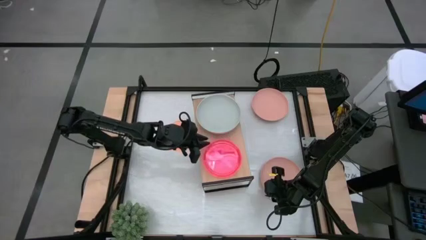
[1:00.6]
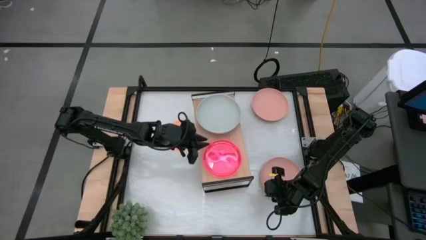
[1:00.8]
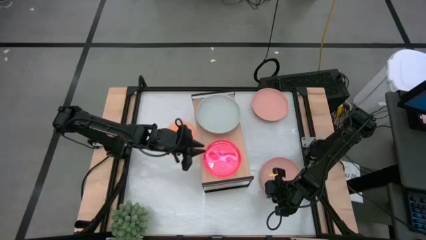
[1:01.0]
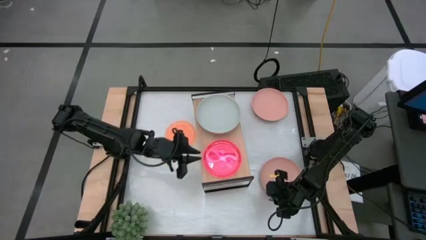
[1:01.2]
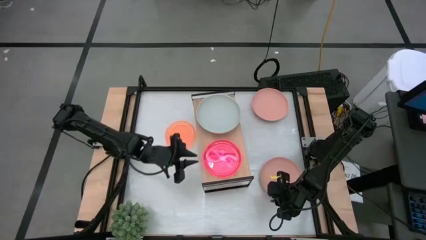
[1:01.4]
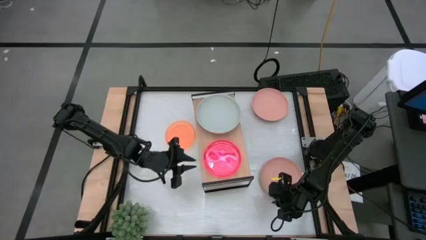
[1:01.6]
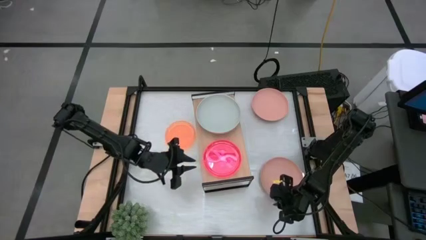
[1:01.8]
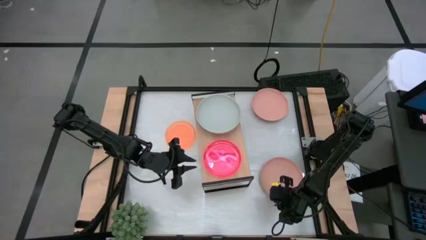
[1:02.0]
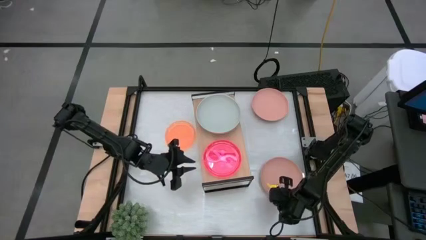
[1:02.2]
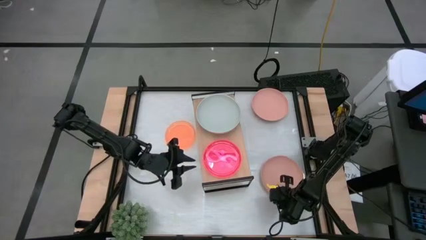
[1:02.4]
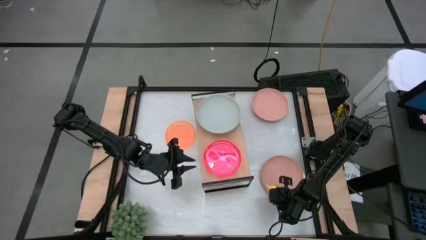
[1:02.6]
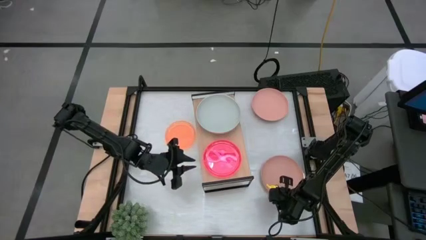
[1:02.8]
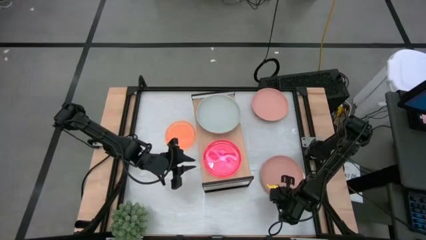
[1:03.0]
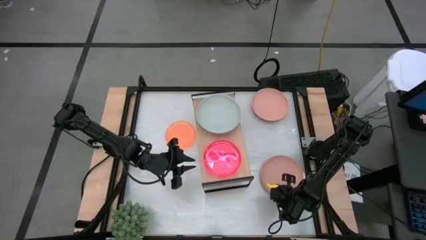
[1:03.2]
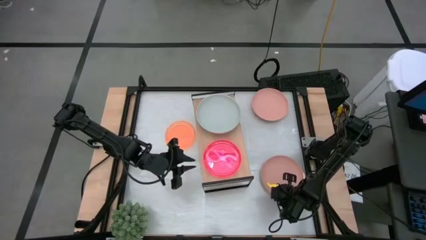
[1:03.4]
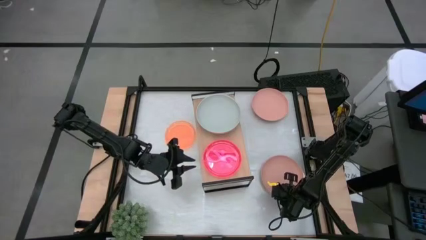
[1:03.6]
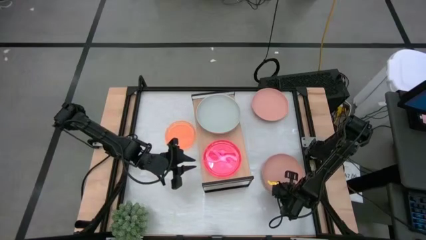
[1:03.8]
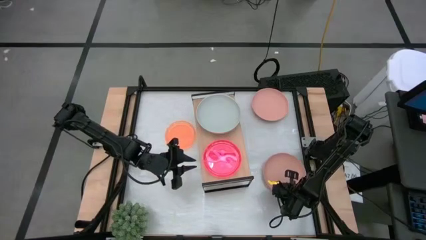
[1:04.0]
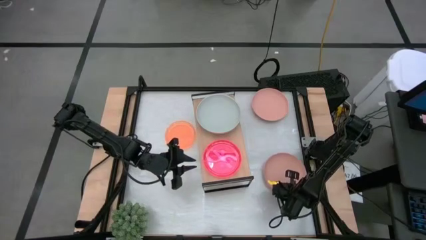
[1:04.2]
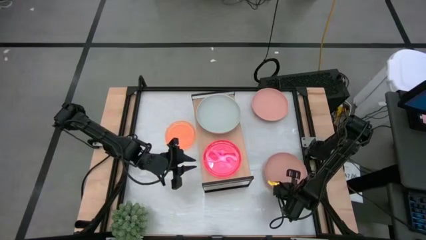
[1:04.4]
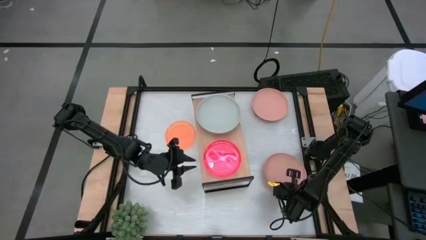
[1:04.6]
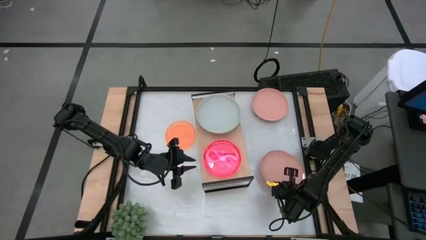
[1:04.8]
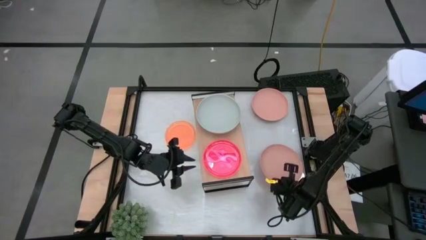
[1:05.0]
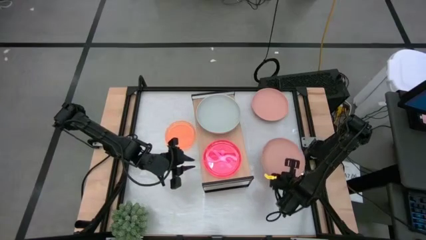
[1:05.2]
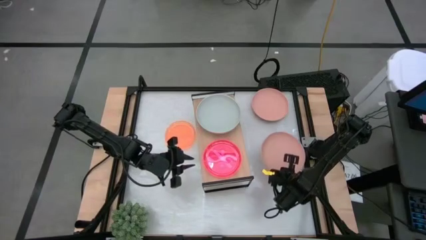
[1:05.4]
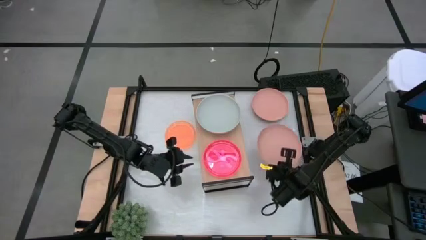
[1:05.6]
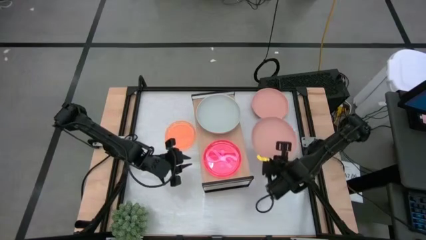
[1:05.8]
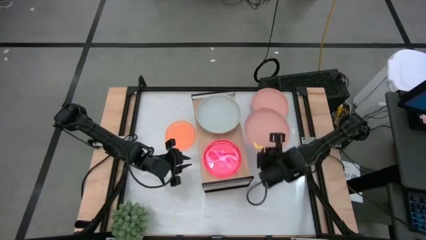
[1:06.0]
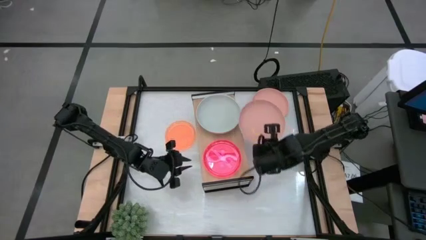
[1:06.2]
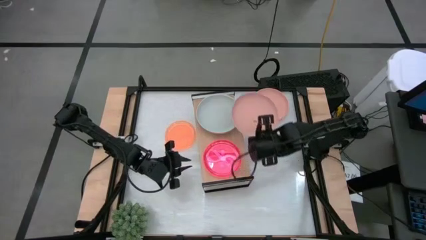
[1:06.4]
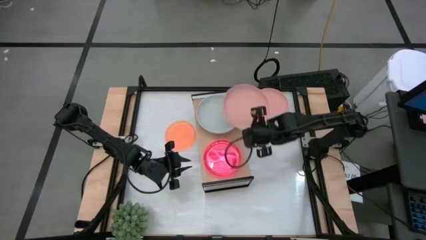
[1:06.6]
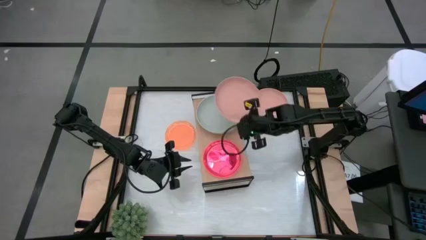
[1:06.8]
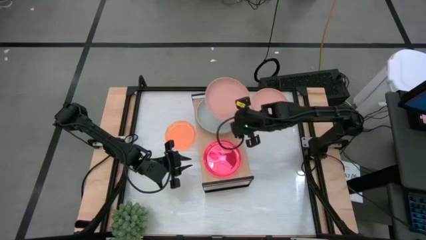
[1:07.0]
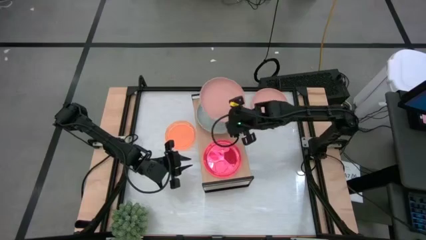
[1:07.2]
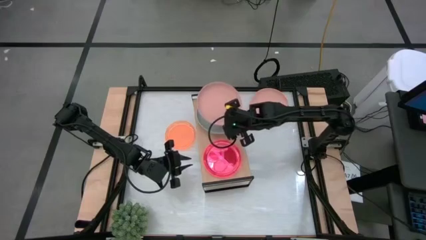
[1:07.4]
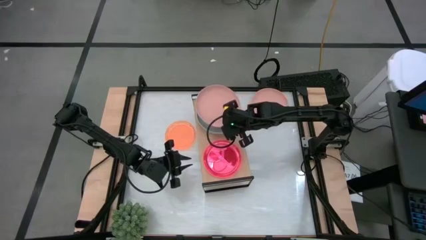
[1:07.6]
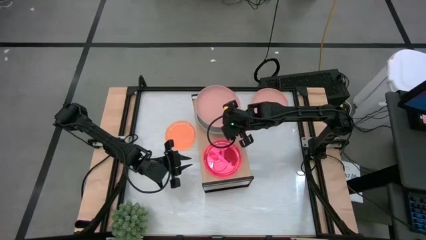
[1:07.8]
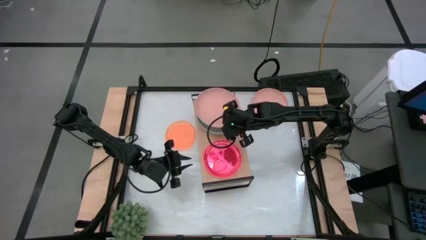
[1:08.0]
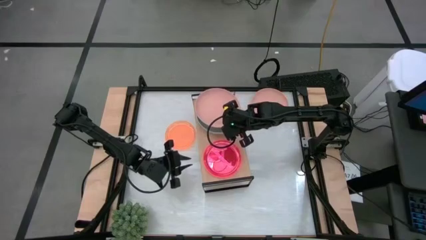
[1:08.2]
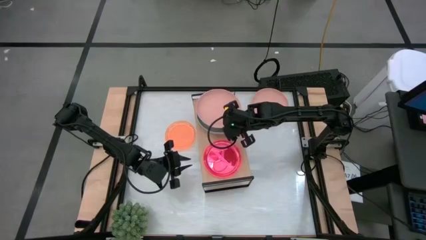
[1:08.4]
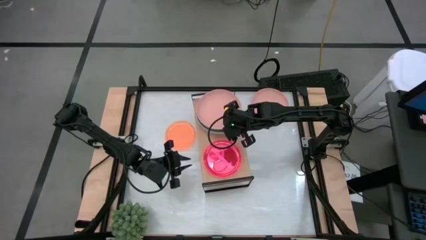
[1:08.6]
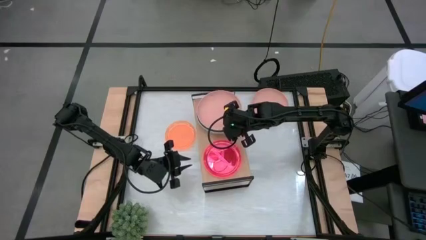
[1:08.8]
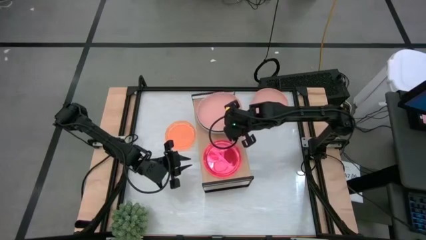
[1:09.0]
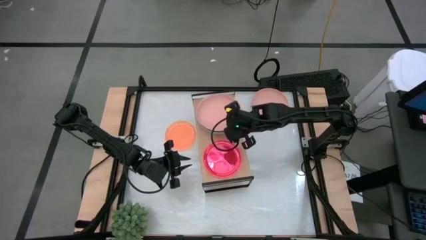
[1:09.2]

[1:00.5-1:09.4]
Task: Place and stack plates onto a shelf
Stack the bottom dark pink plate on the gray plate on the shelf

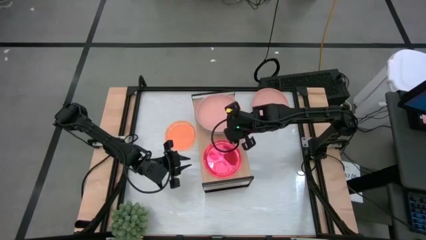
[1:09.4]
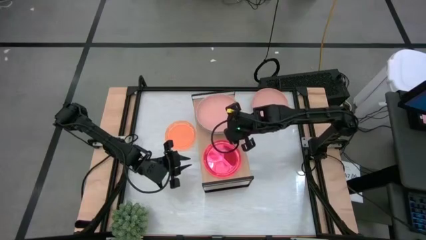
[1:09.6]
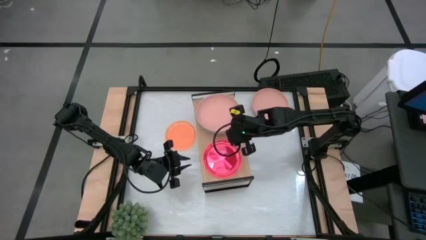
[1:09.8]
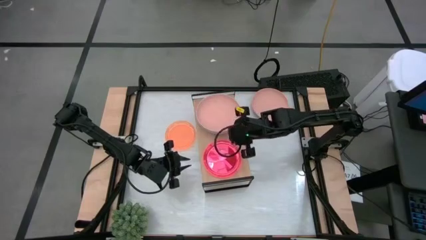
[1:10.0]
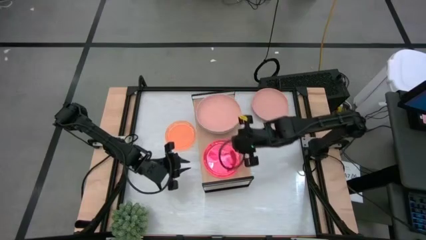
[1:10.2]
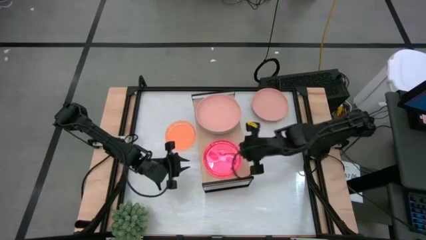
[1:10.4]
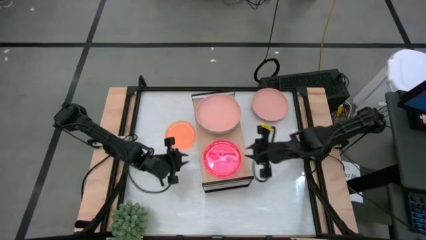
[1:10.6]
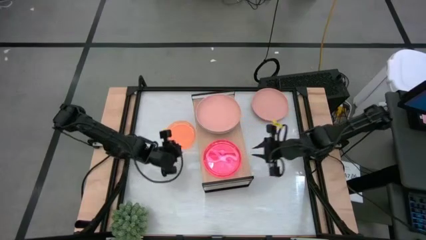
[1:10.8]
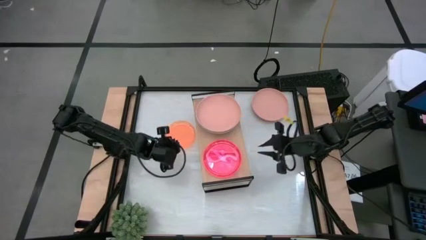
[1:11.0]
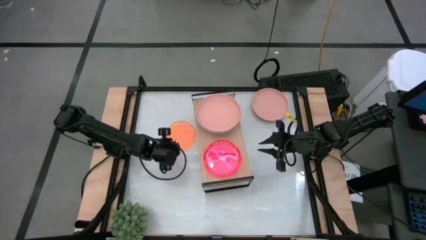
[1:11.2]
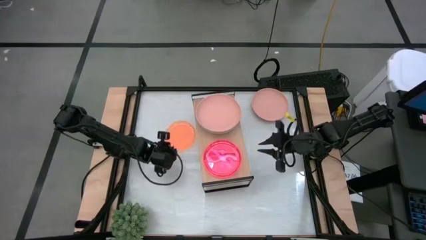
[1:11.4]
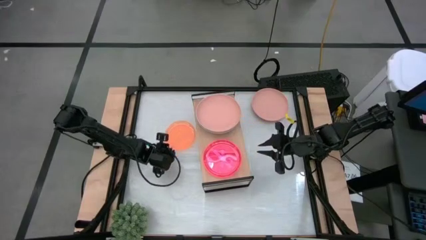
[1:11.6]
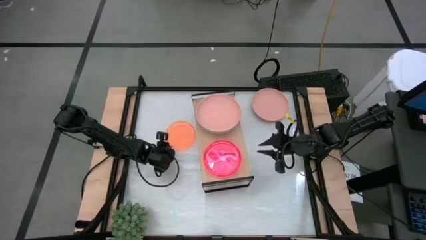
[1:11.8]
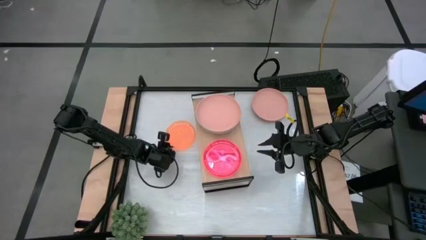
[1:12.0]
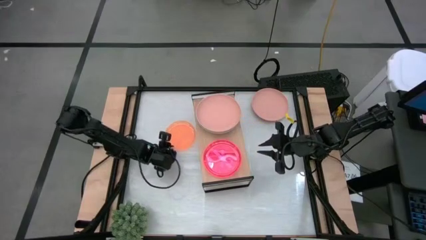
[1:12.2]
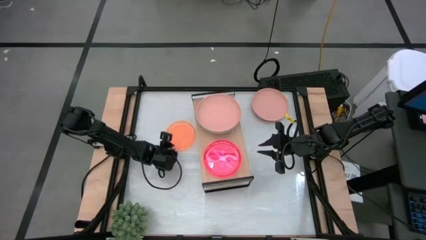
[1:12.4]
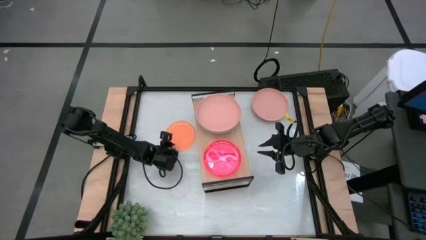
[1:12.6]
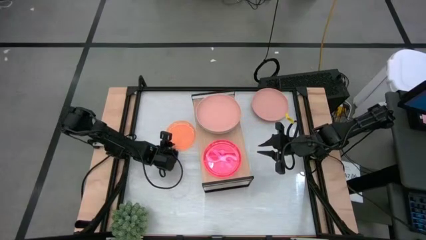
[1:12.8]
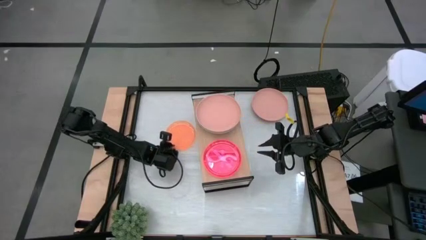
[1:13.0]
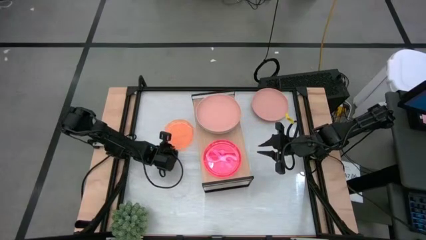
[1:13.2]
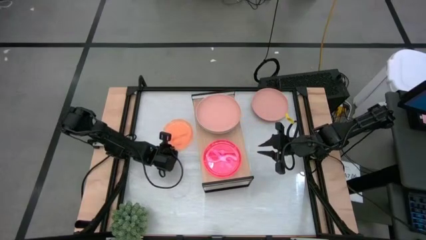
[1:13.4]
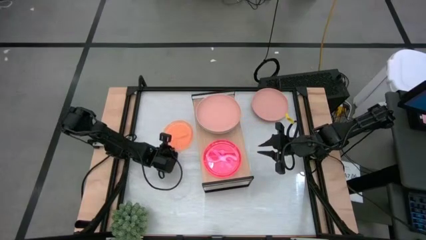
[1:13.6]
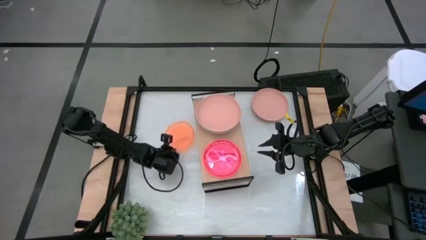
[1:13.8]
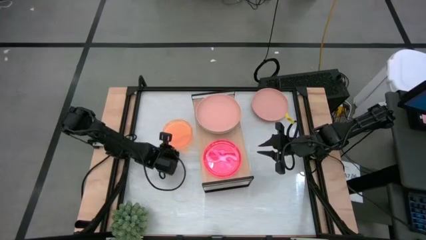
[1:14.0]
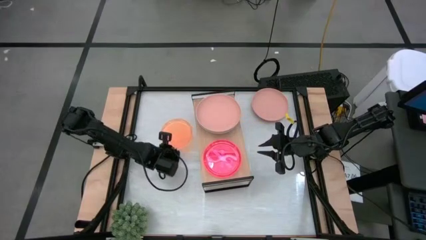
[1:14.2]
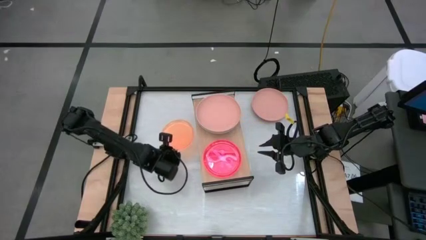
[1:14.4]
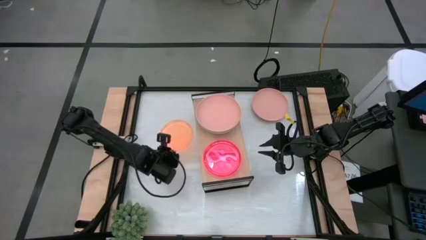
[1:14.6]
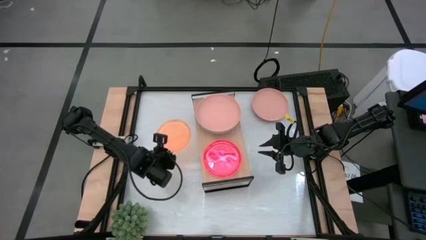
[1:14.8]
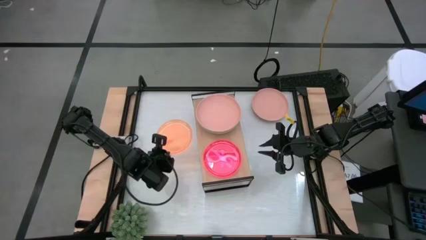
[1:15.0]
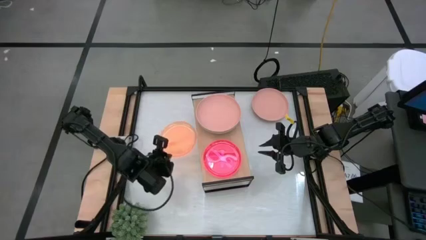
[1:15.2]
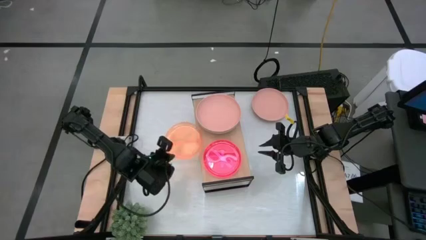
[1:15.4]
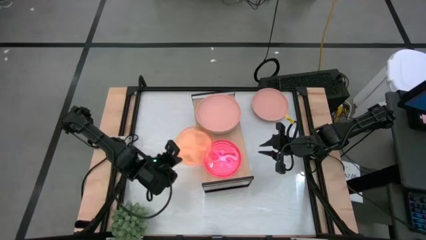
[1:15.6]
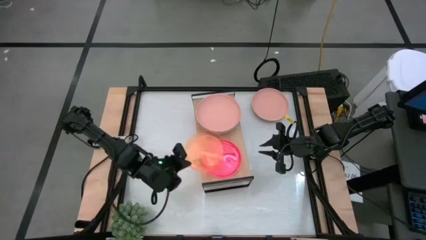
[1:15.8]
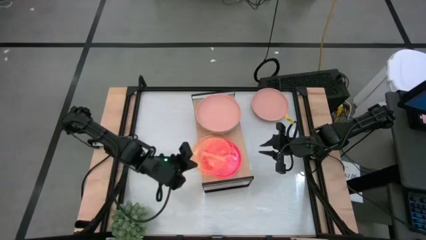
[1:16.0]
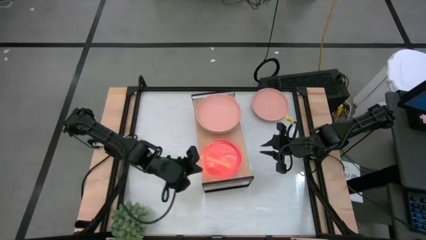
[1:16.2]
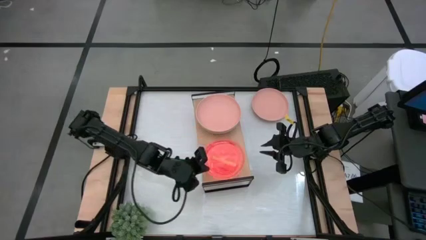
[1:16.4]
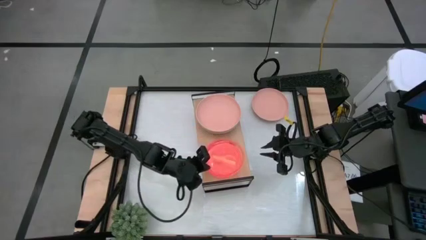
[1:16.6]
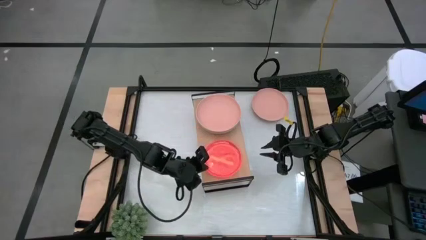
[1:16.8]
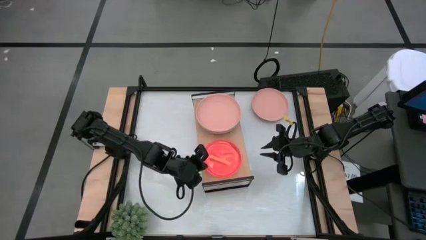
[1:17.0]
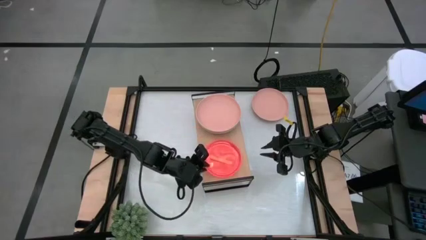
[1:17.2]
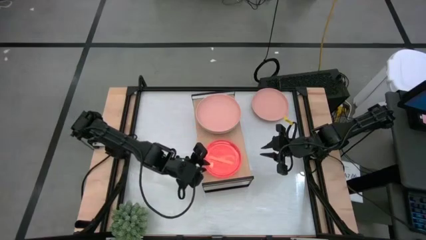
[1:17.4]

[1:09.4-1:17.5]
Stack the orange plate on the pink plate on the shelf
